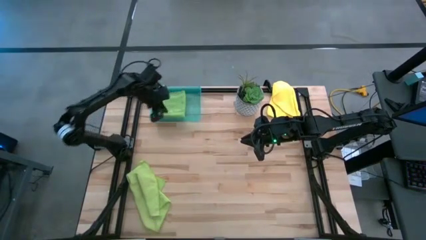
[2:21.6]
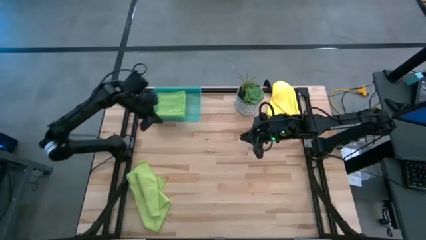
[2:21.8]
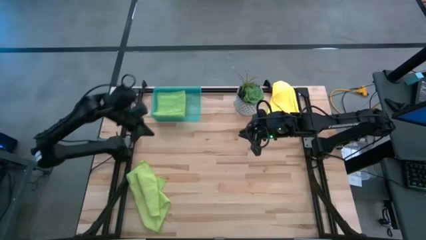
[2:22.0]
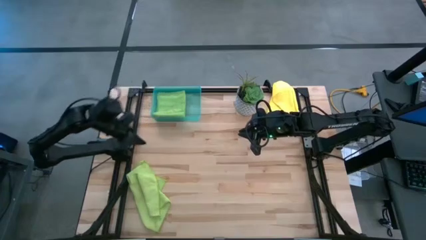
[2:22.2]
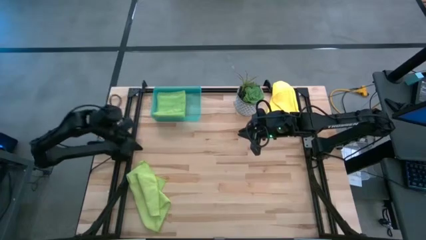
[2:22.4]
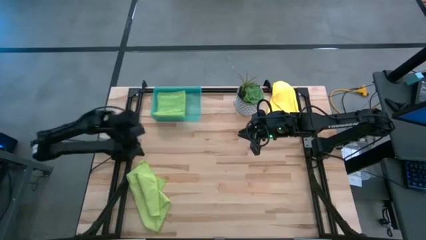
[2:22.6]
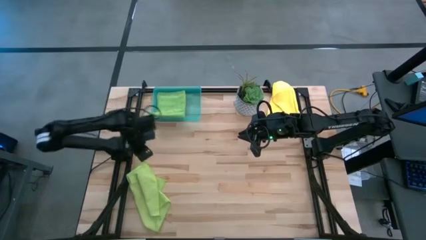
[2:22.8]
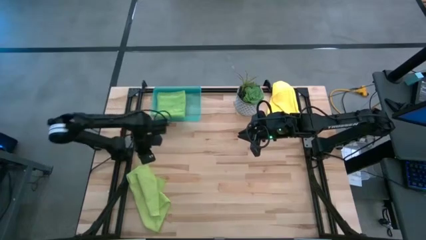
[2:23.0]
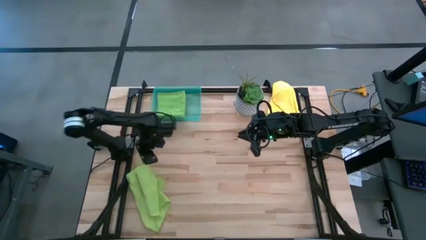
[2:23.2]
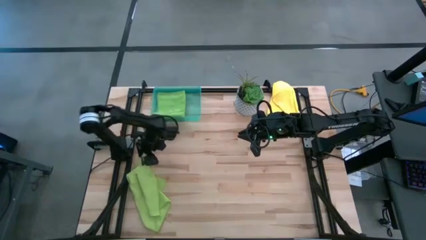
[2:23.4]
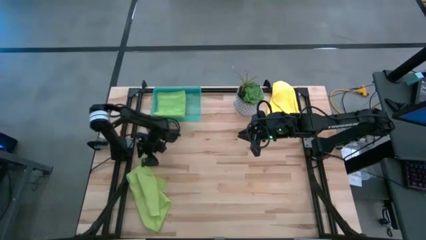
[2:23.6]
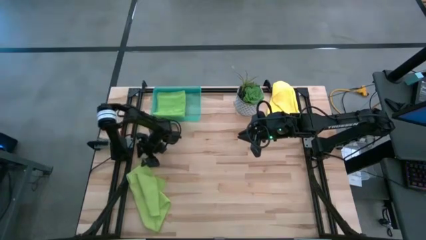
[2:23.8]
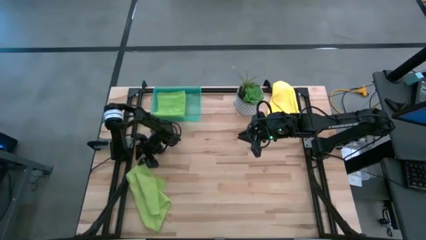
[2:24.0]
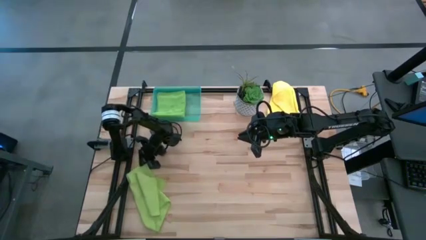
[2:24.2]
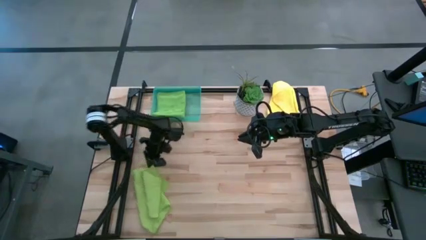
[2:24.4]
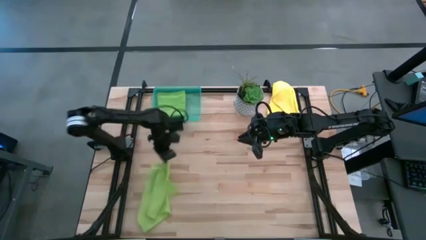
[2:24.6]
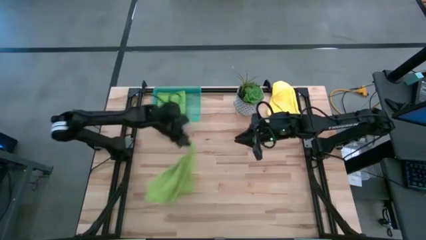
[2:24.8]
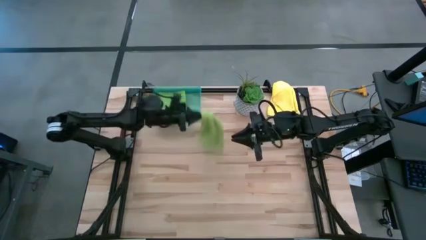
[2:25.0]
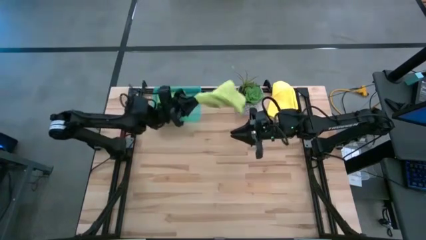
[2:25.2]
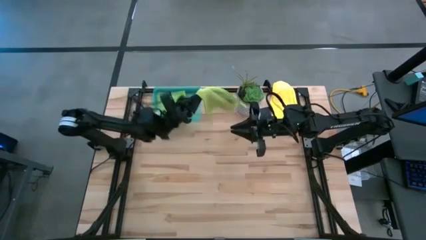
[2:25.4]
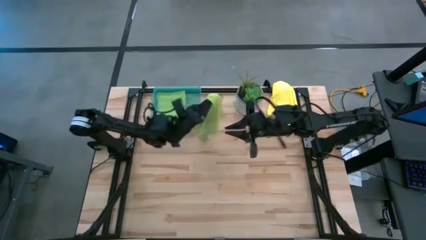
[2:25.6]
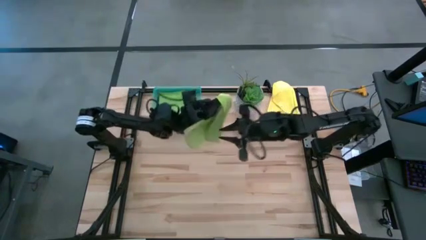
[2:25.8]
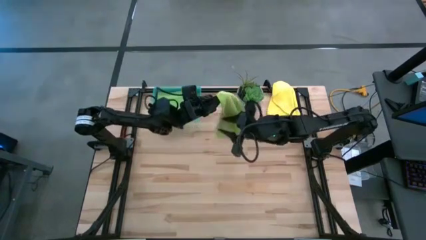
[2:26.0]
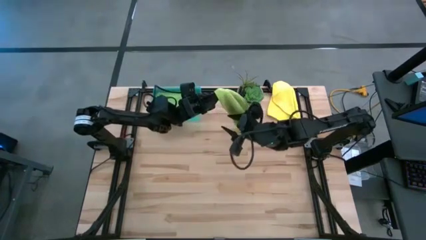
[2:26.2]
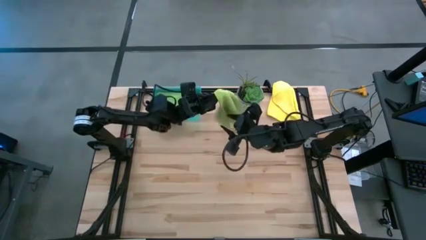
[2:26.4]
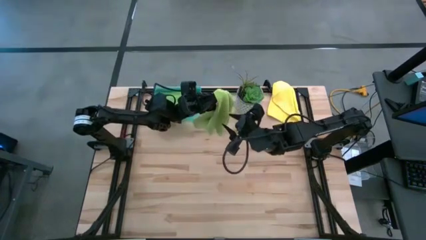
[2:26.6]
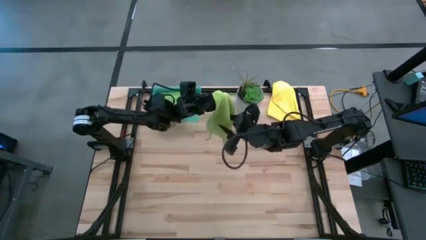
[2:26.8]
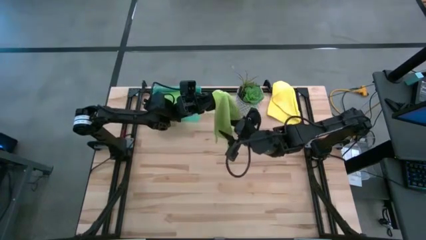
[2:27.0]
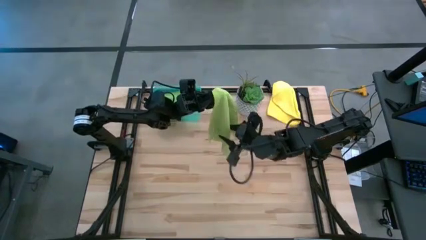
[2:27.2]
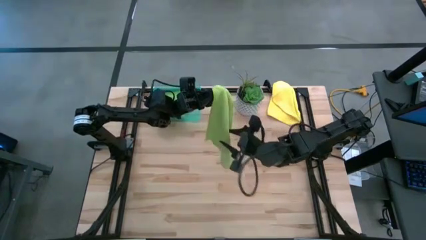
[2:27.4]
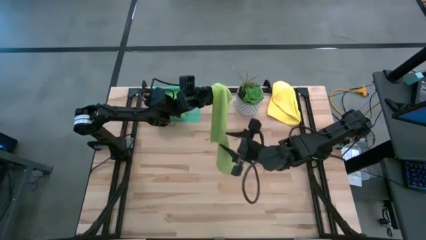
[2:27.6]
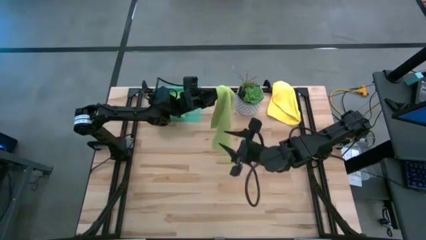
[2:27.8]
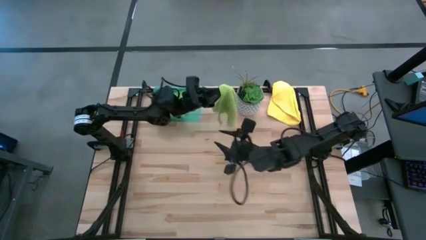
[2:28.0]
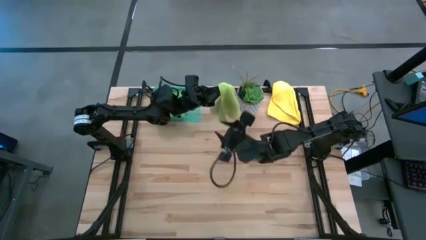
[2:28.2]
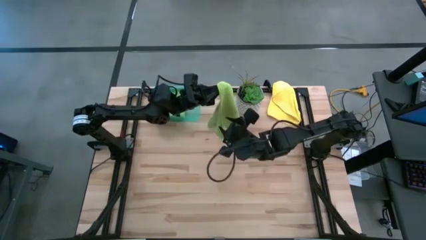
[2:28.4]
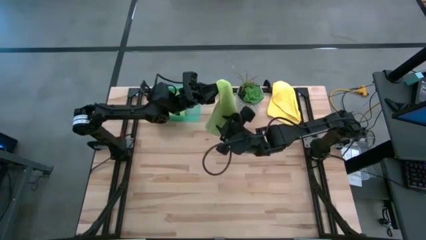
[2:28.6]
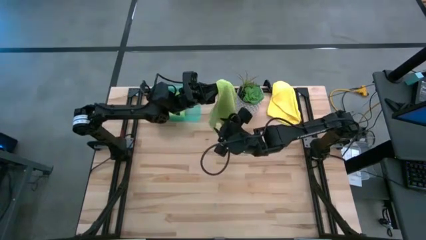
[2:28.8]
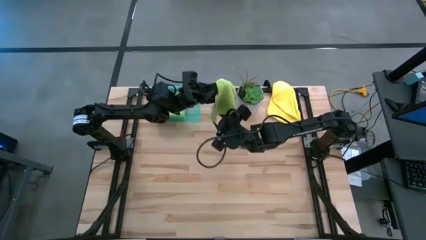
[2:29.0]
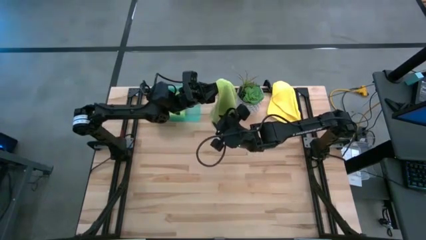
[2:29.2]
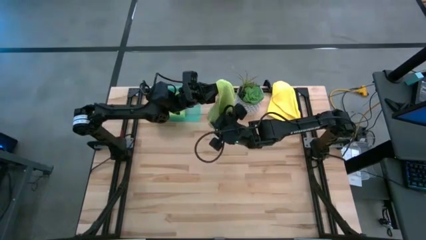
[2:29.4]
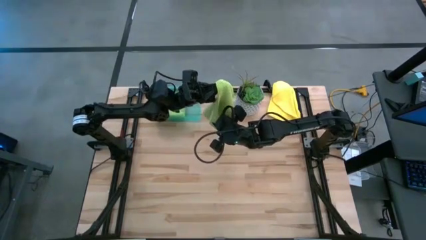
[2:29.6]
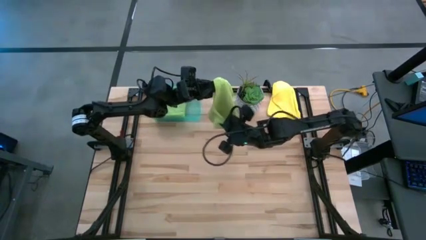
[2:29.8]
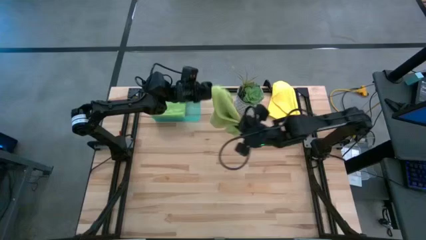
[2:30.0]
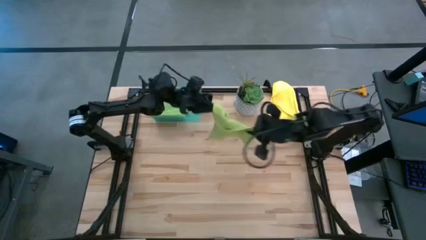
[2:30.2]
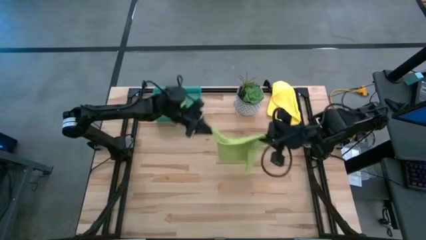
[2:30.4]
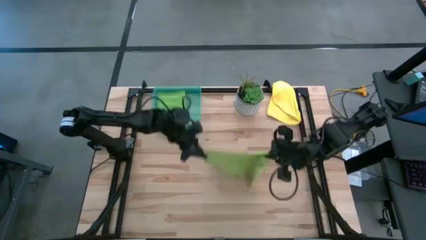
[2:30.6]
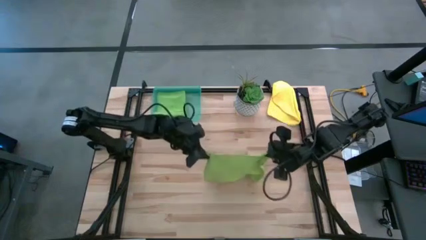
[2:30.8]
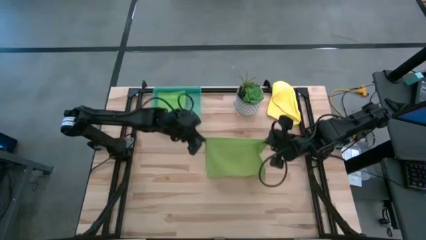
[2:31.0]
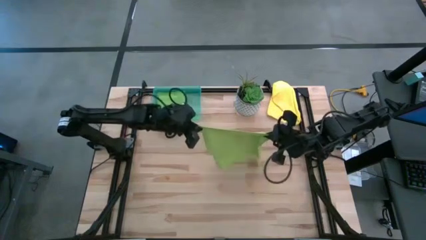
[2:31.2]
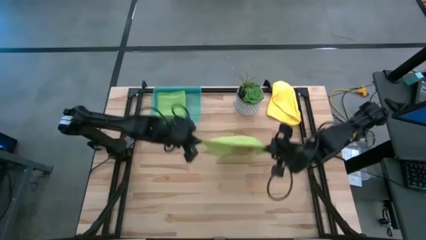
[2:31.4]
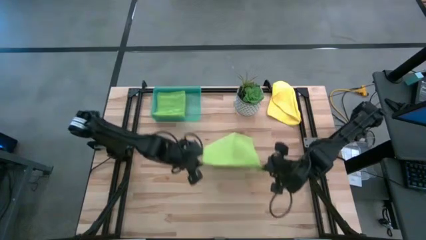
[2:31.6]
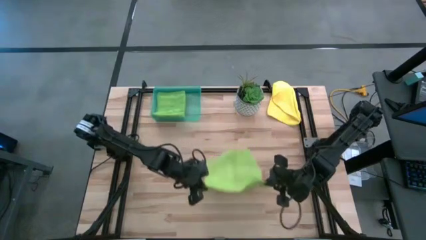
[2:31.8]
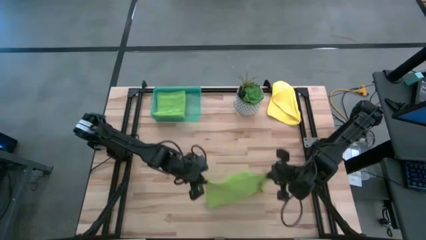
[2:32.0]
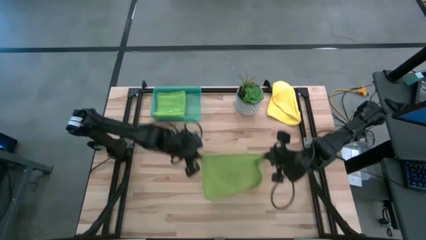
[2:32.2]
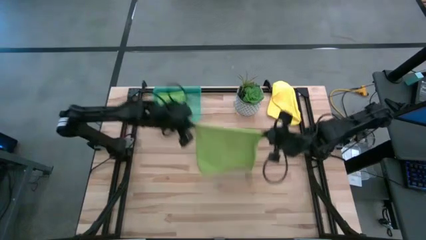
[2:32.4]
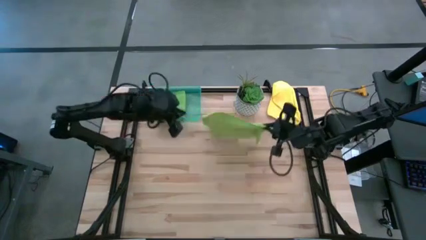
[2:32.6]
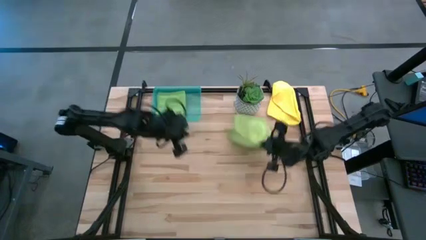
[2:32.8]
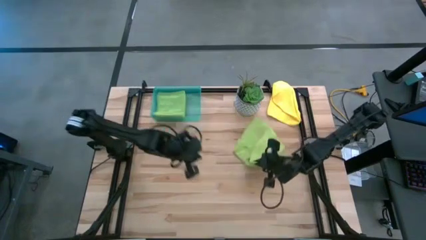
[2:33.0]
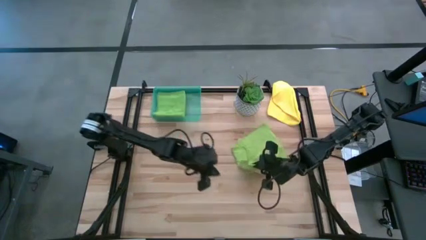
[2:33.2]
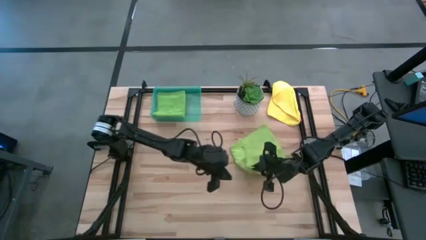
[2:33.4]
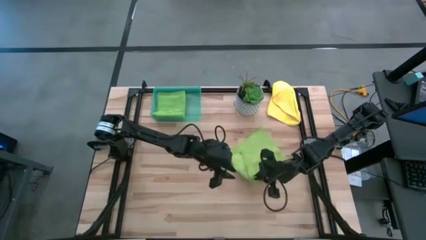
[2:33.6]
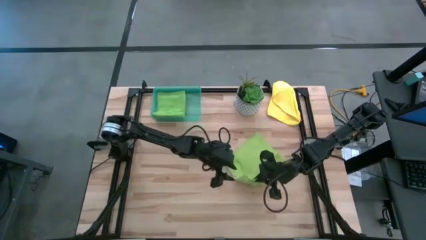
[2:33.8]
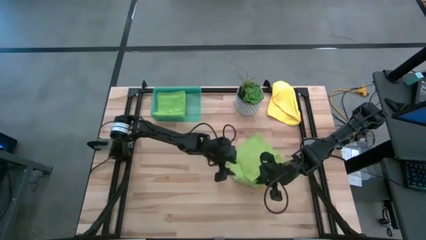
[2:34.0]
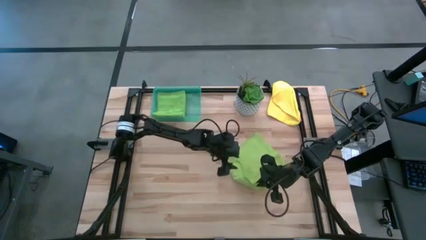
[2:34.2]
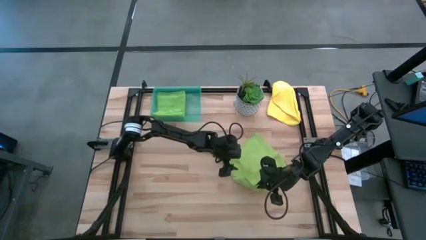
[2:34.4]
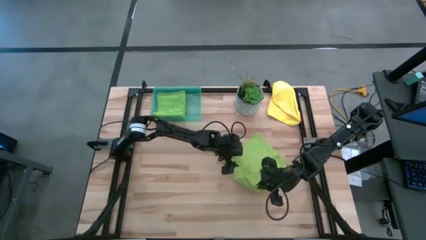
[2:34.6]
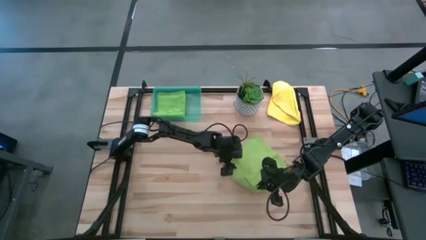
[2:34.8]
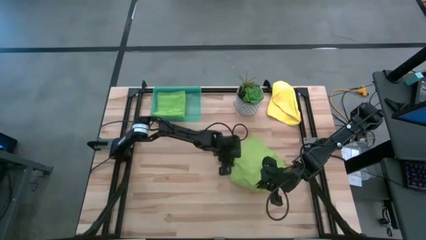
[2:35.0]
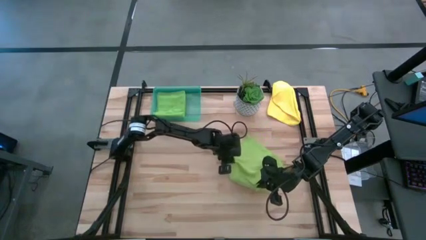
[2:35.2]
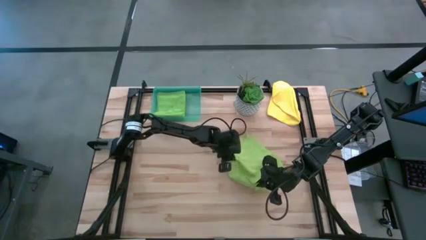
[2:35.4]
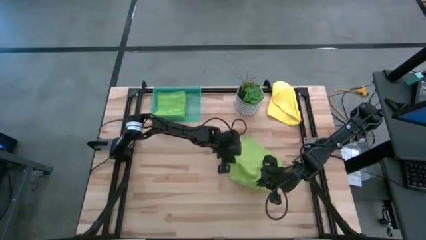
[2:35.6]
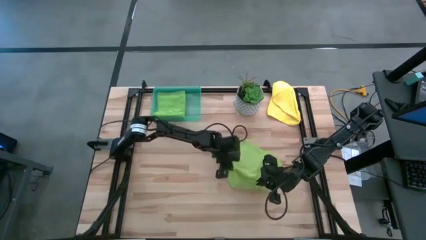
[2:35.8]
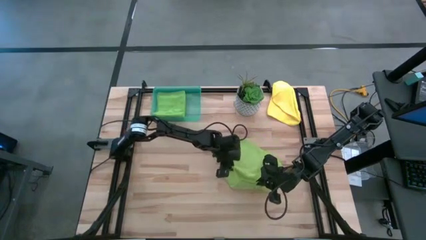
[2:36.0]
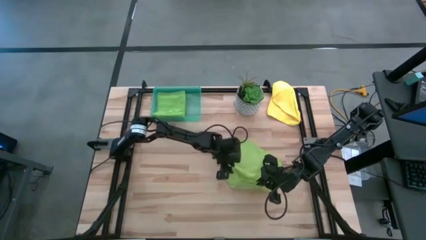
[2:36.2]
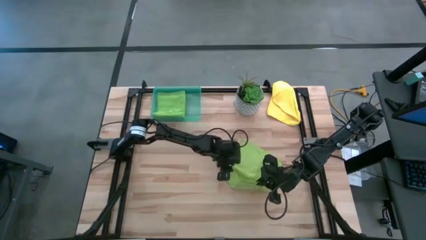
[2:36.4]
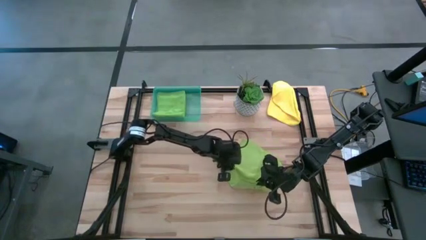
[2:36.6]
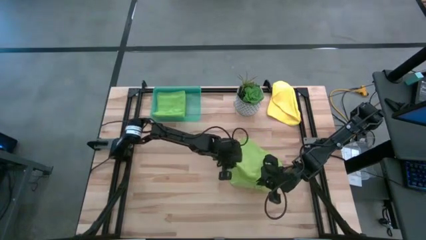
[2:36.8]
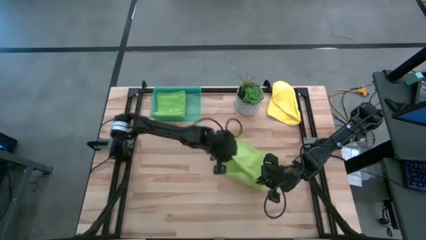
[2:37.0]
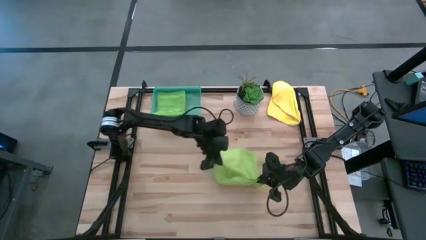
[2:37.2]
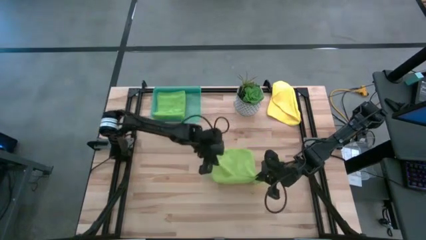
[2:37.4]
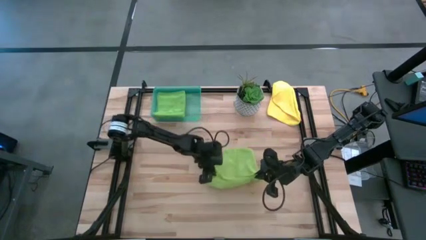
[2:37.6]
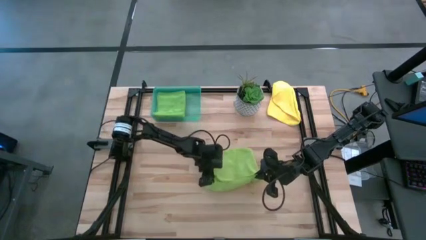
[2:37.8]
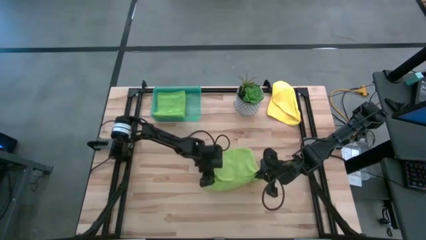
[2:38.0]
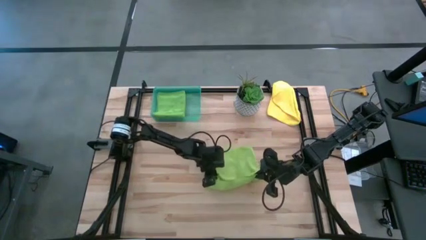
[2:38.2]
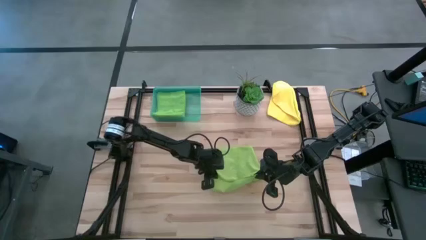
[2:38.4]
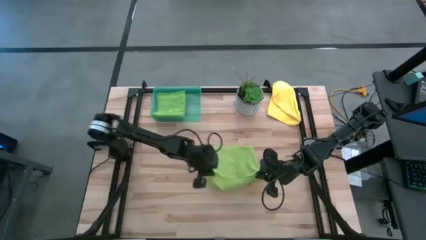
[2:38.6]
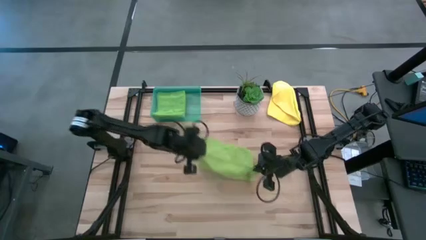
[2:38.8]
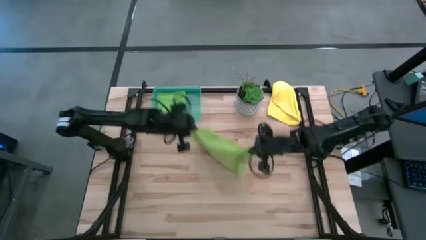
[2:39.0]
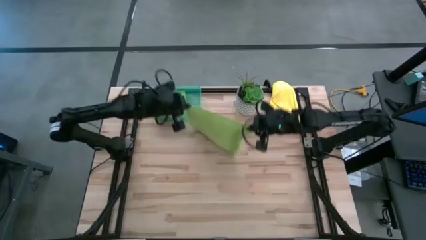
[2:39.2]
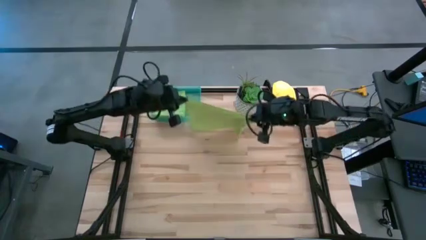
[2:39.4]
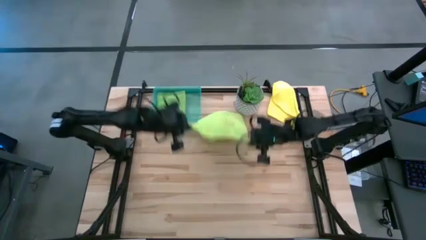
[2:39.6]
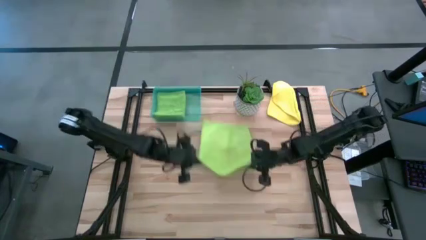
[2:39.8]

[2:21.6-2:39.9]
Task: Fold microfiber towels
Fold the yellow-green microfiber cloth
